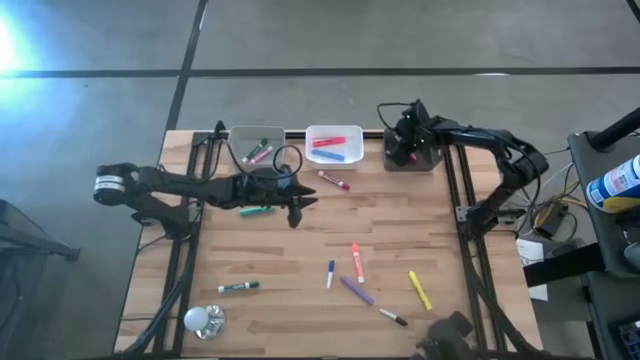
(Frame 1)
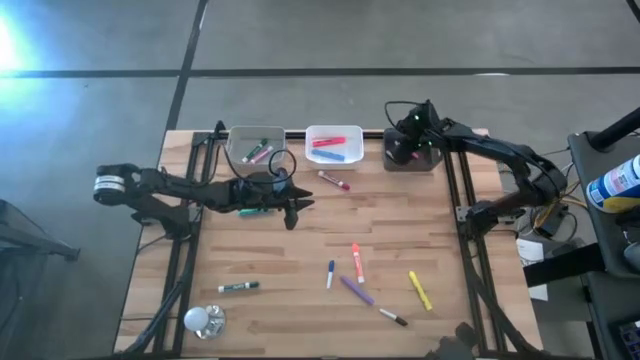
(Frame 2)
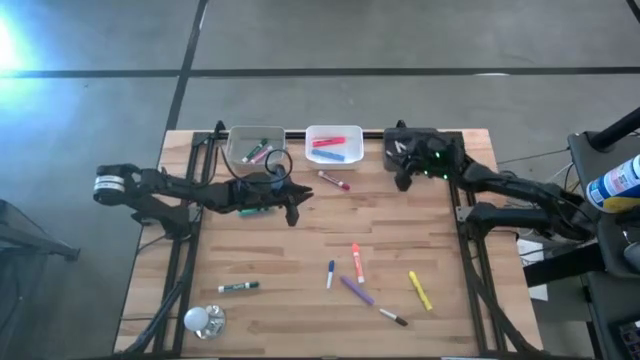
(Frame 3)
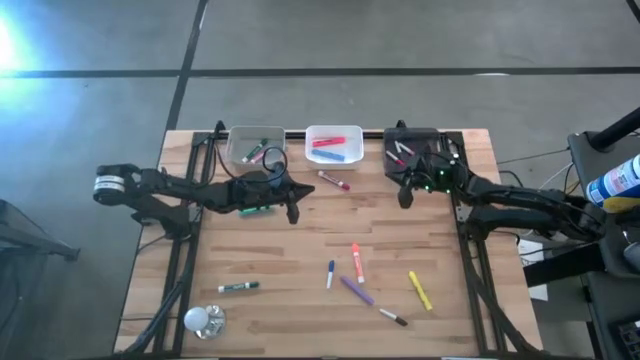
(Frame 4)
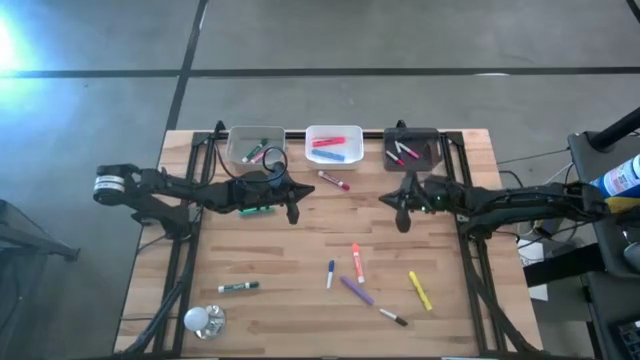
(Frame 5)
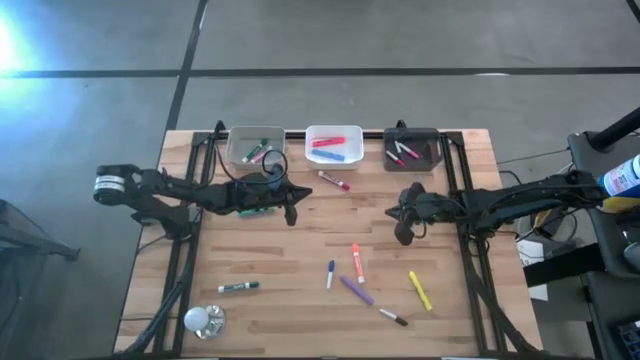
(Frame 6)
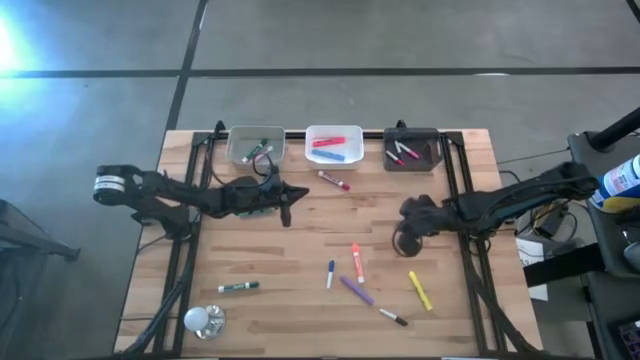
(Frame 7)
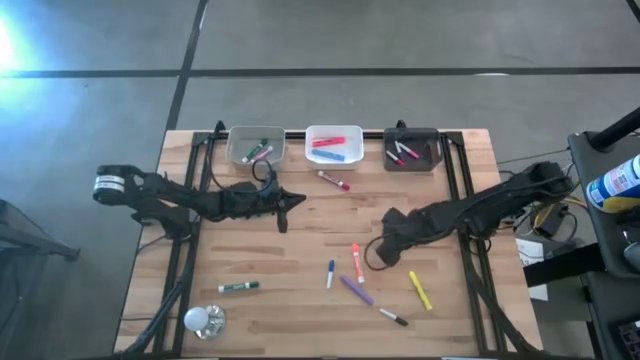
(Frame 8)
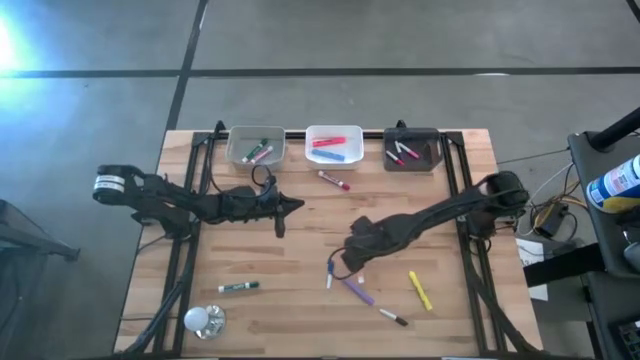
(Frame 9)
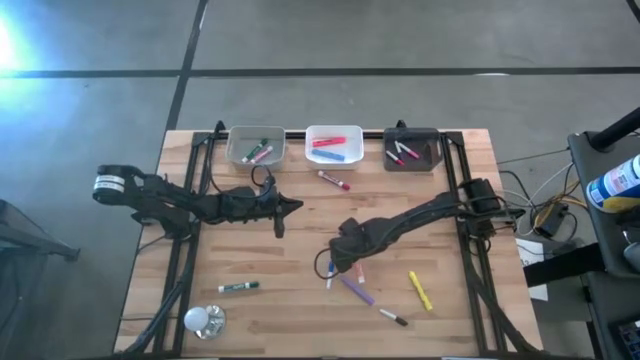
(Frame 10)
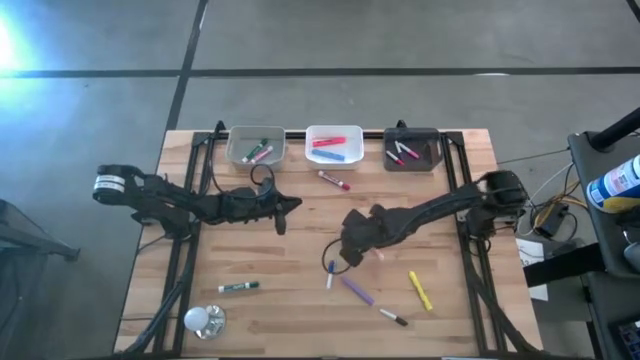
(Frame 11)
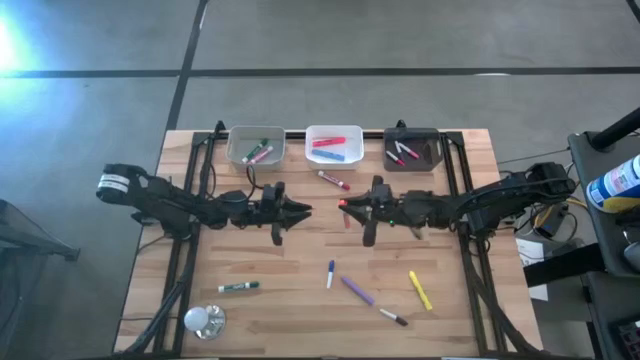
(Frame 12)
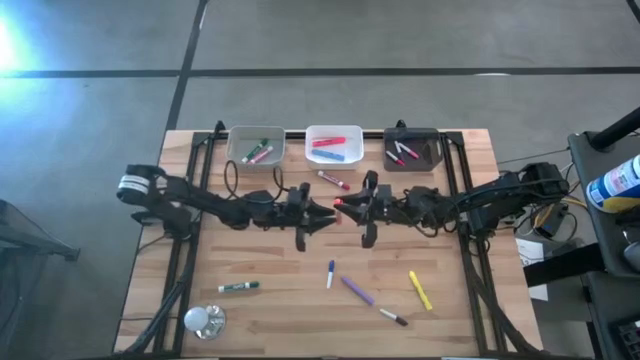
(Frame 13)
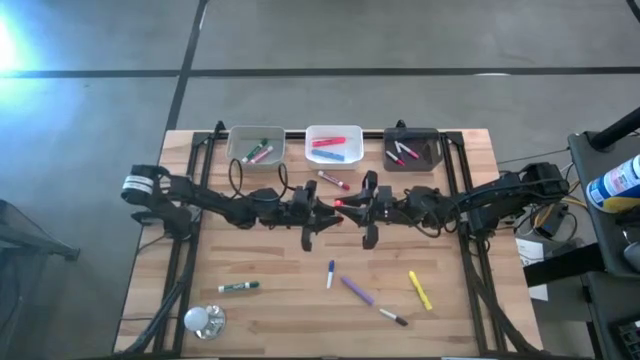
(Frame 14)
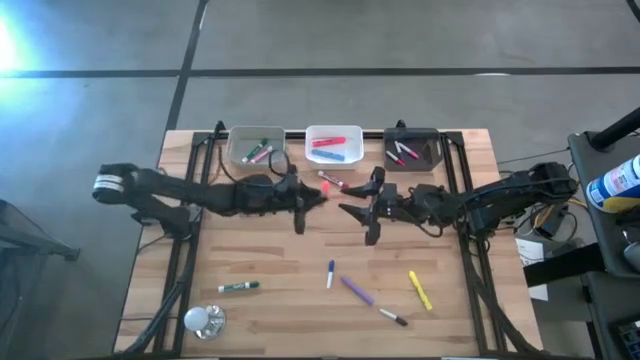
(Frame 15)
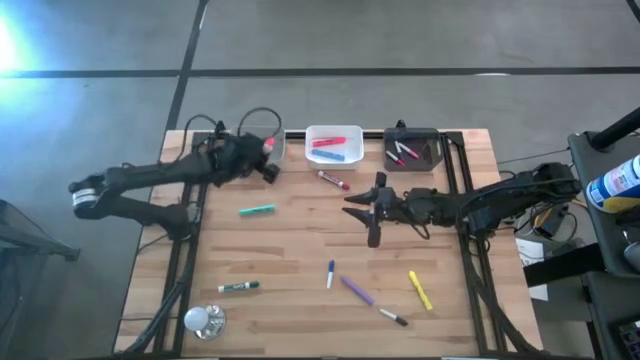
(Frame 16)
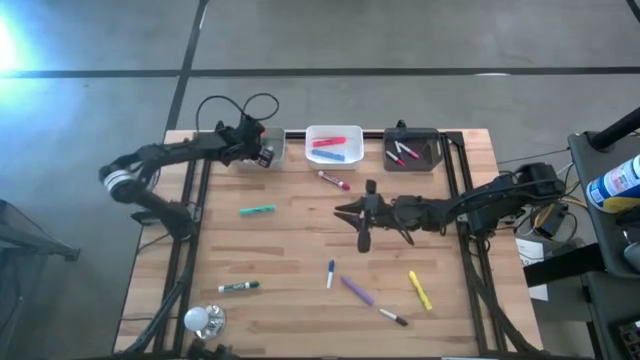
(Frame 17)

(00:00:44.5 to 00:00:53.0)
Task: Pick & Place Markers
Put the orange marker pen into the gray bin

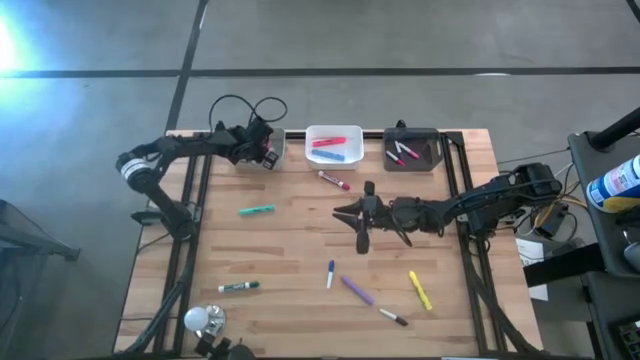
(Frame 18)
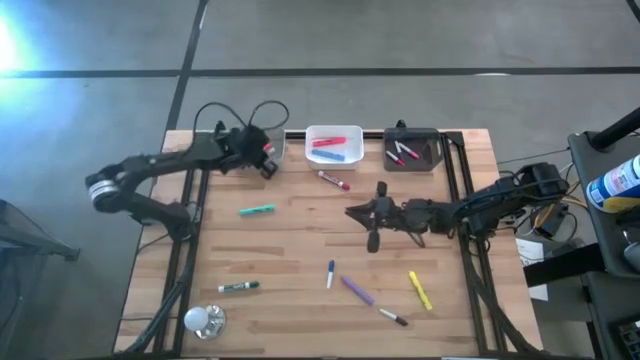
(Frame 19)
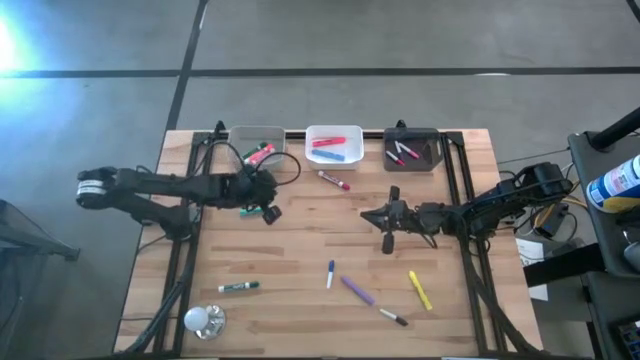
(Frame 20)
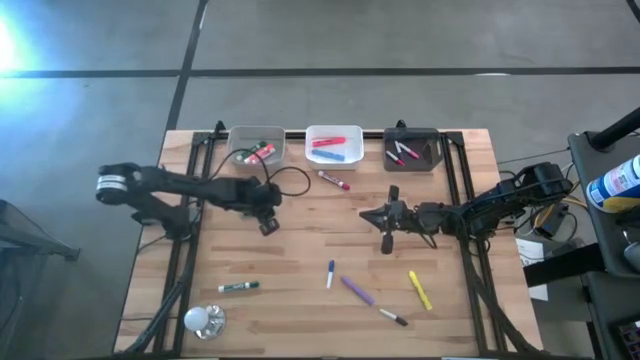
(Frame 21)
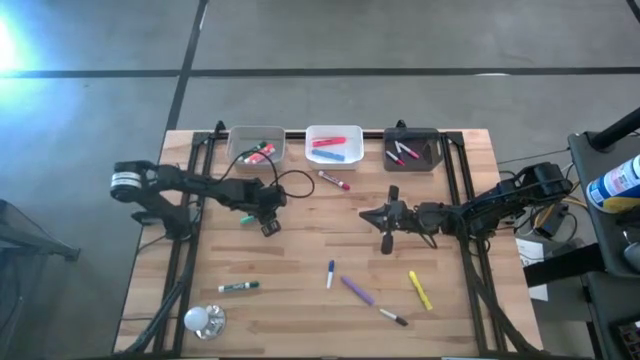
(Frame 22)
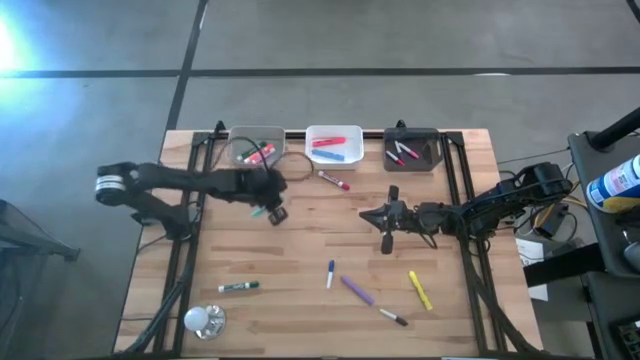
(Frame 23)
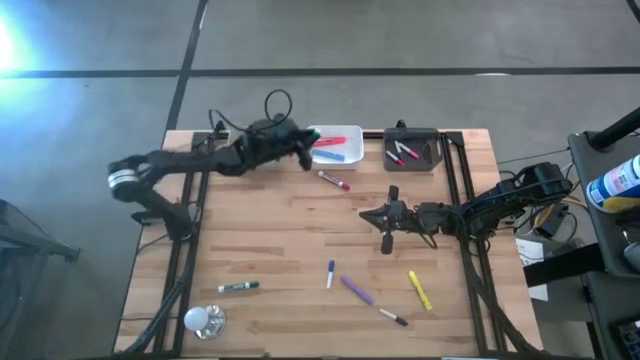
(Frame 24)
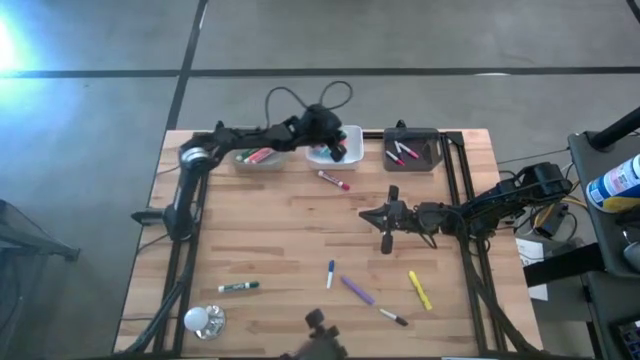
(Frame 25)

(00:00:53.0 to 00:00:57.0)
Put the light blue highlighter pen into the white bin

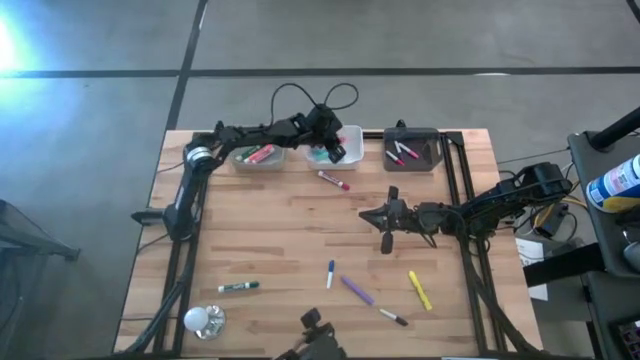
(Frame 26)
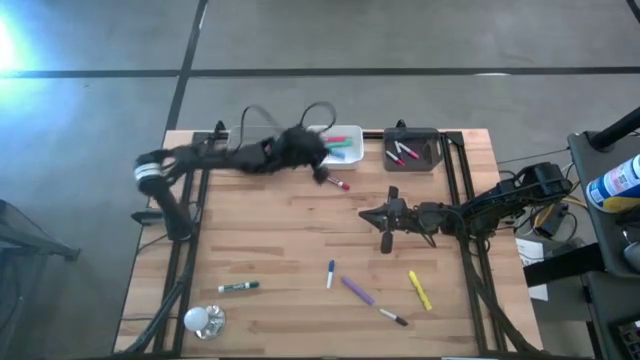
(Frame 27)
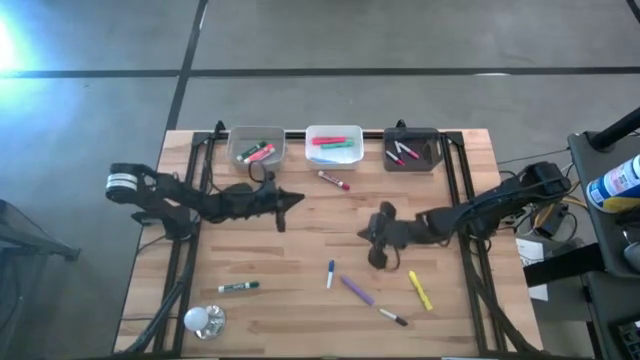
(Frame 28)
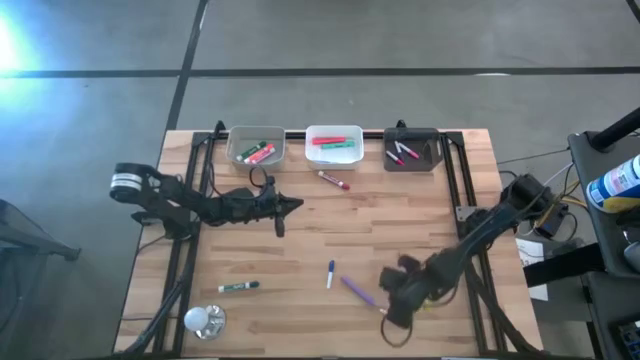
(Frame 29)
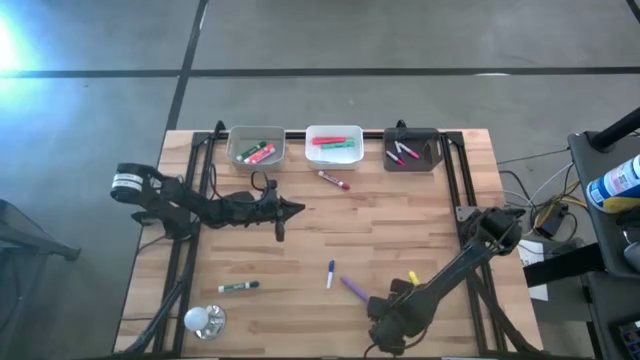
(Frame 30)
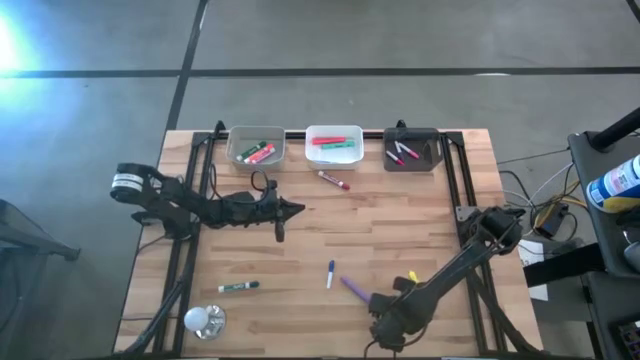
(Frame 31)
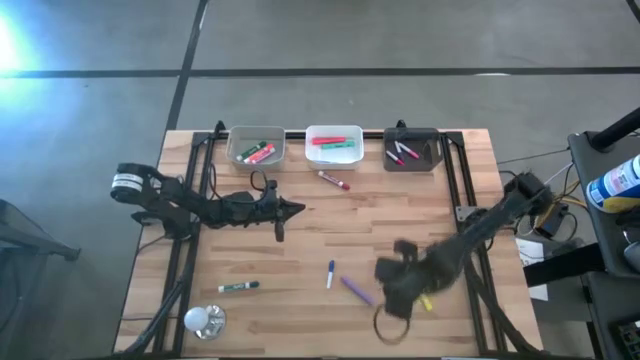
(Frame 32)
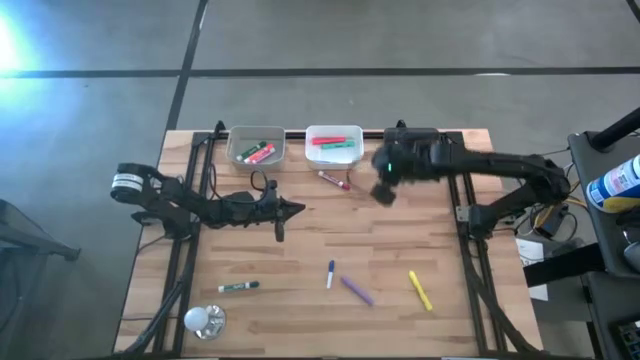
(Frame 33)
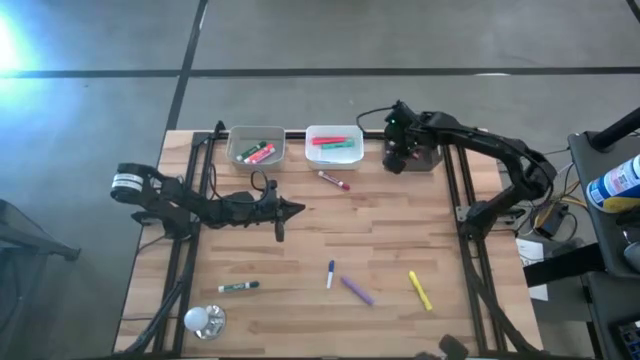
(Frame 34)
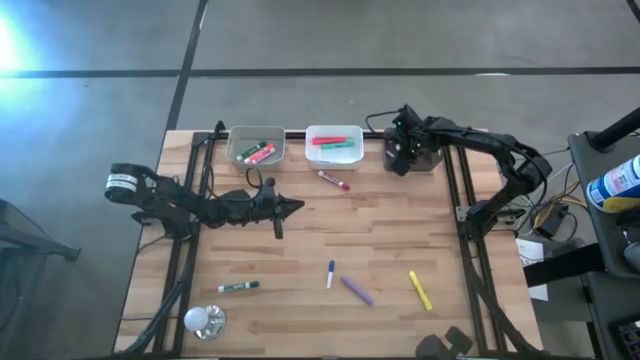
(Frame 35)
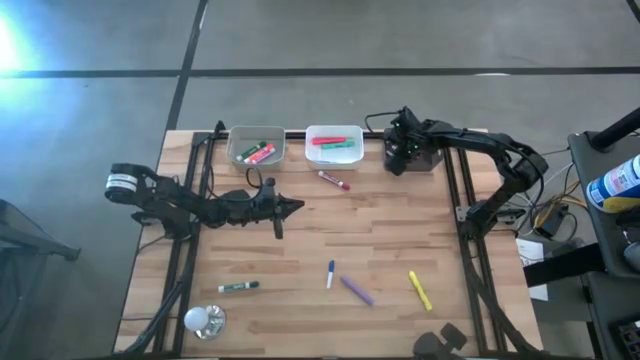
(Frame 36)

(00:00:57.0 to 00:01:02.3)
Put the black pen into the black bin

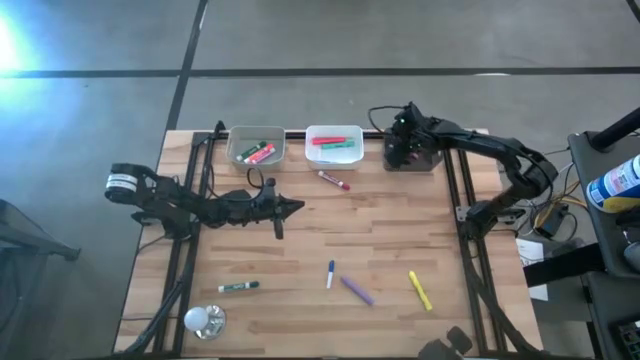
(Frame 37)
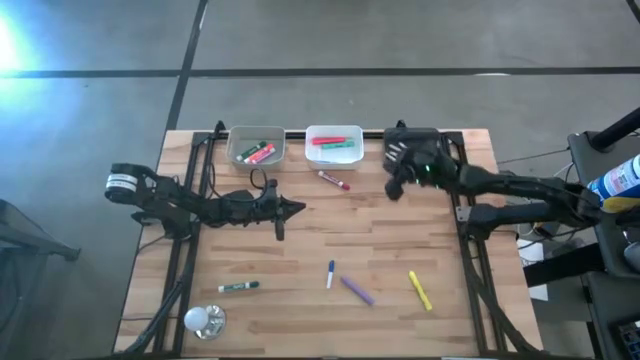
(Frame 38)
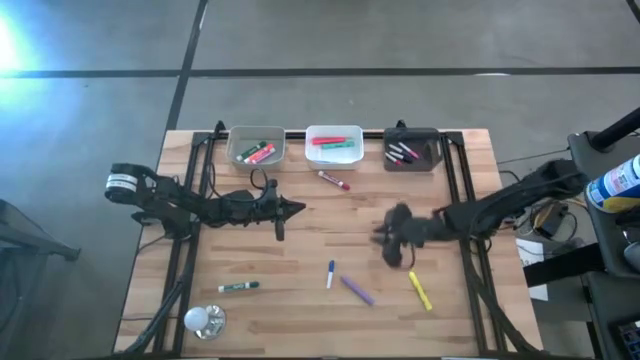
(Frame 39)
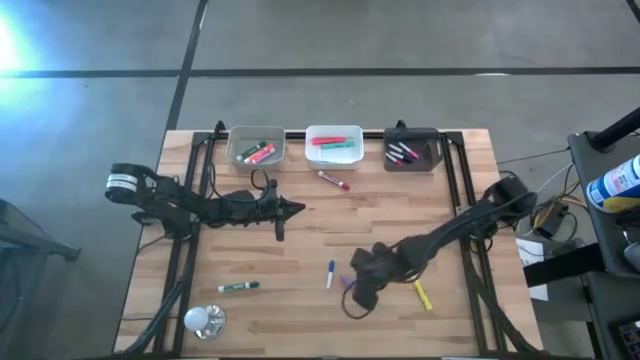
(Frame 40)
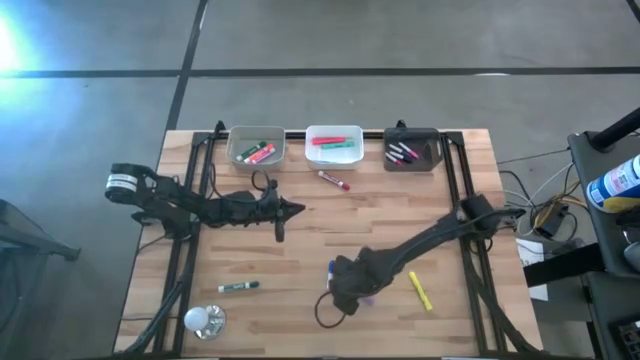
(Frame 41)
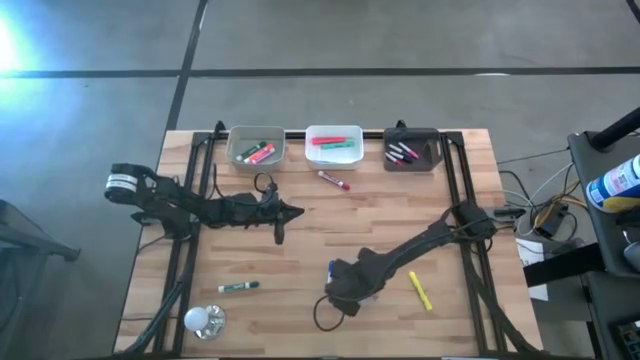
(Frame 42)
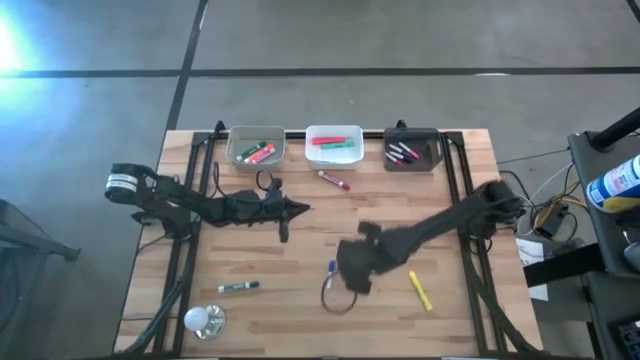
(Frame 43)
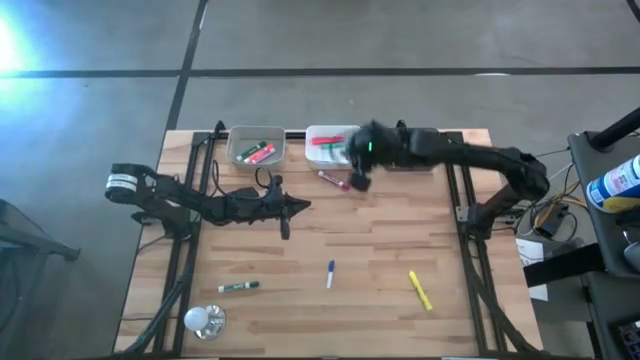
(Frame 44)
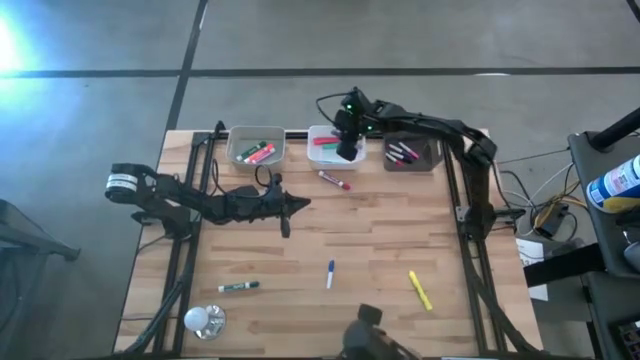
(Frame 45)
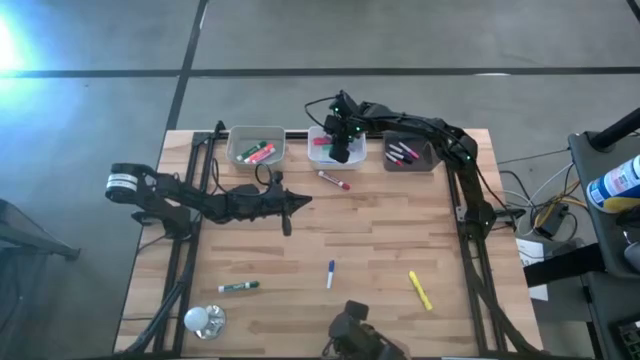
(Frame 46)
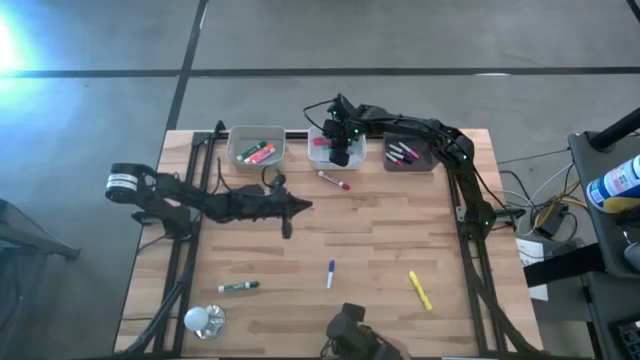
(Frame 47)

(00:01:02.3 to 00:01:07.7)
Put the purple highlighter pen into the white bin
